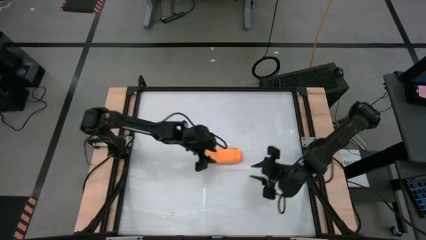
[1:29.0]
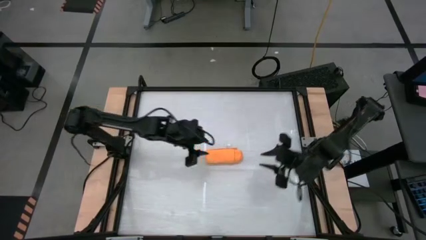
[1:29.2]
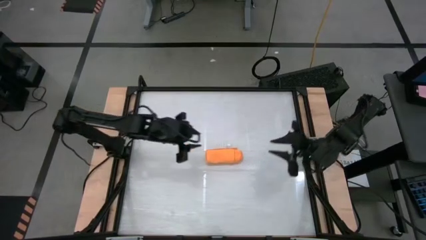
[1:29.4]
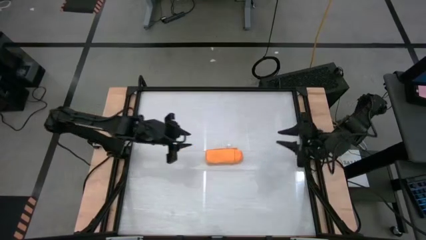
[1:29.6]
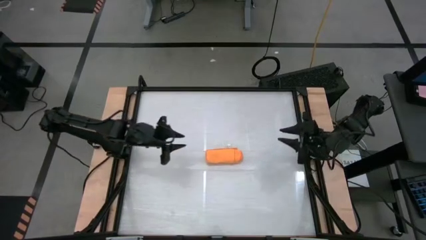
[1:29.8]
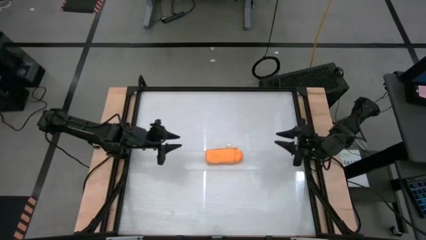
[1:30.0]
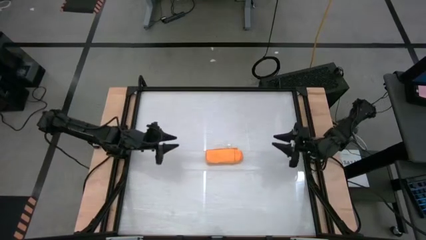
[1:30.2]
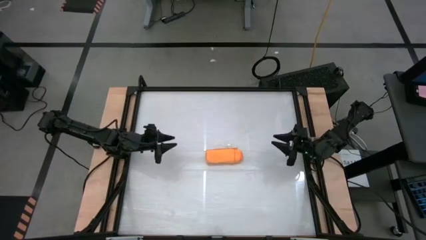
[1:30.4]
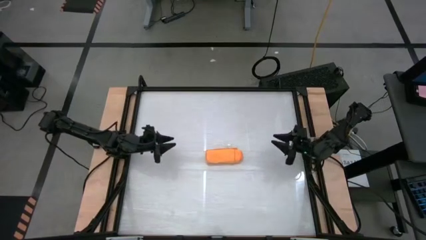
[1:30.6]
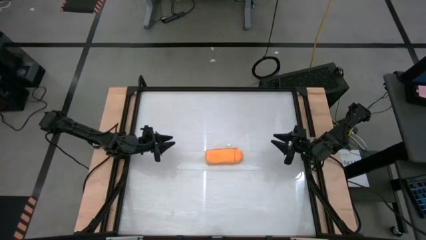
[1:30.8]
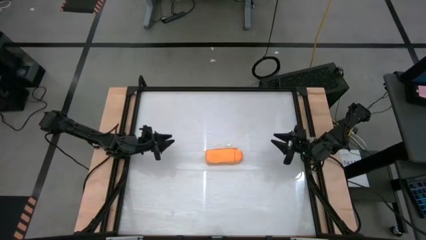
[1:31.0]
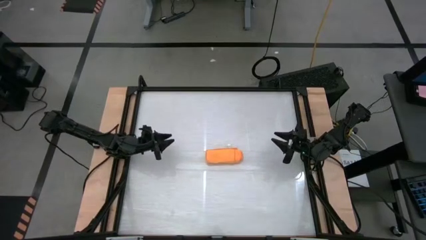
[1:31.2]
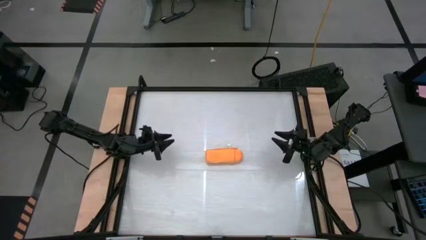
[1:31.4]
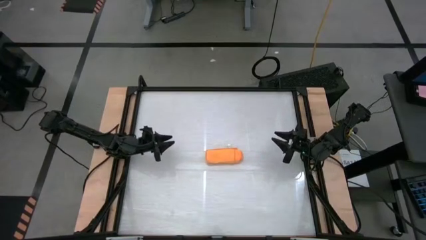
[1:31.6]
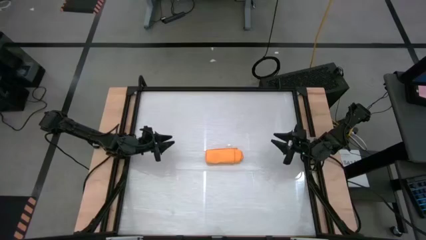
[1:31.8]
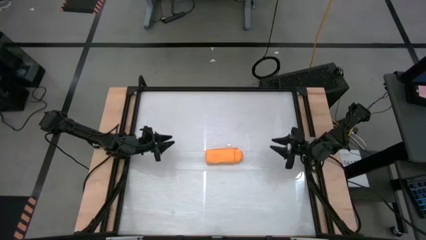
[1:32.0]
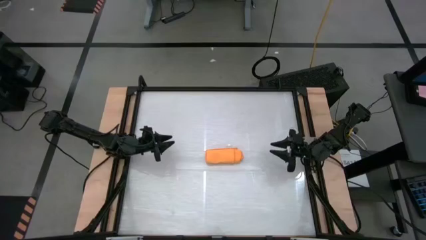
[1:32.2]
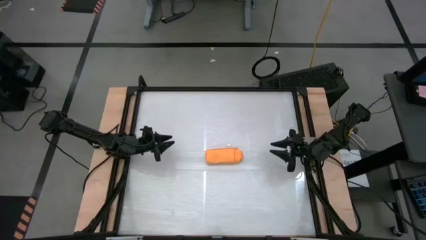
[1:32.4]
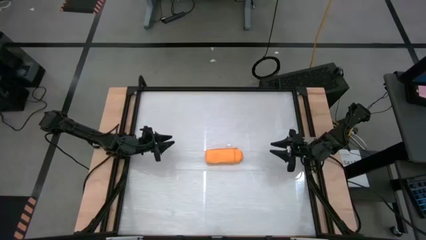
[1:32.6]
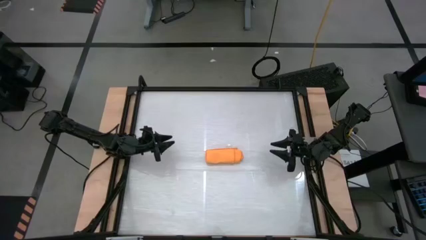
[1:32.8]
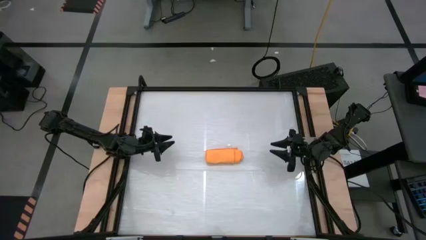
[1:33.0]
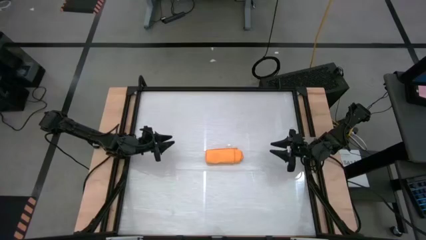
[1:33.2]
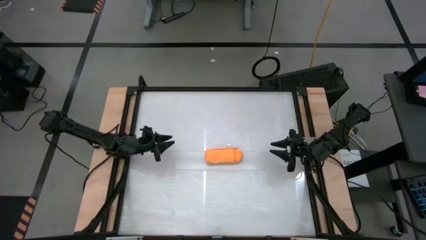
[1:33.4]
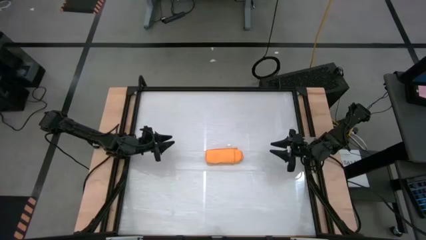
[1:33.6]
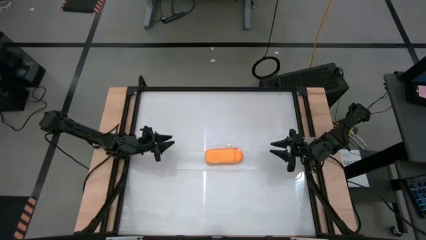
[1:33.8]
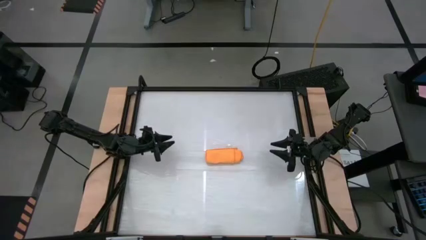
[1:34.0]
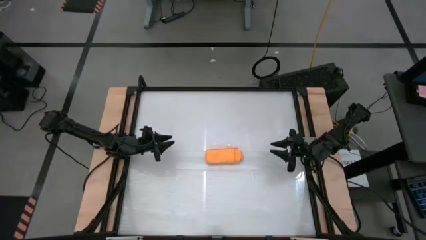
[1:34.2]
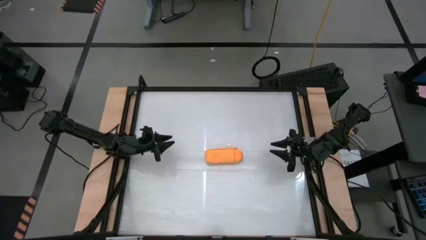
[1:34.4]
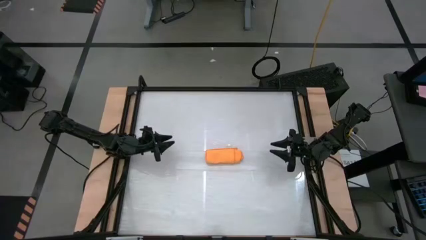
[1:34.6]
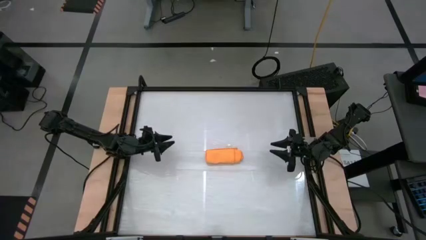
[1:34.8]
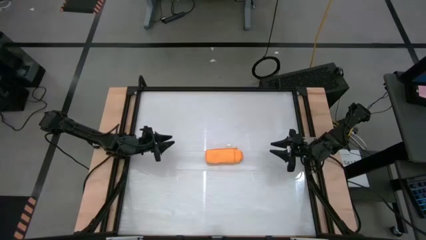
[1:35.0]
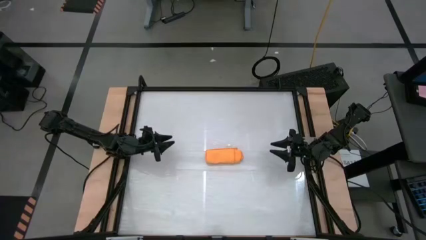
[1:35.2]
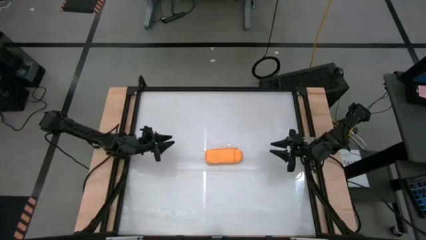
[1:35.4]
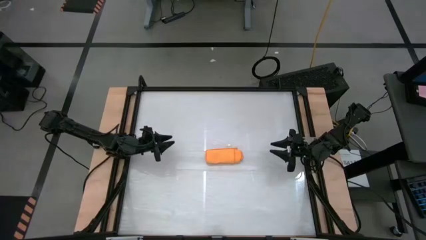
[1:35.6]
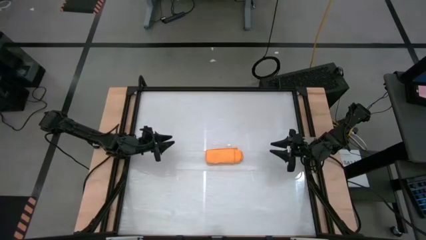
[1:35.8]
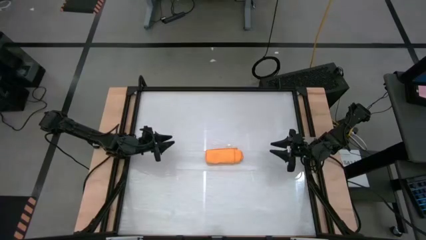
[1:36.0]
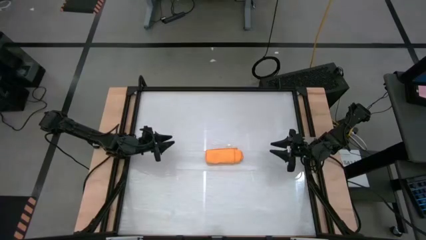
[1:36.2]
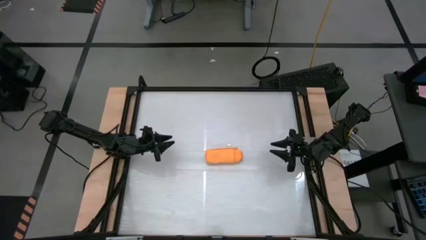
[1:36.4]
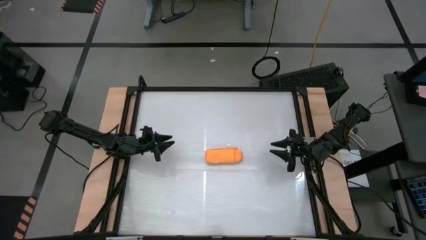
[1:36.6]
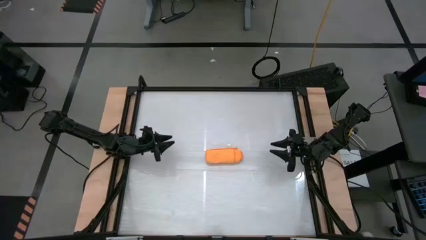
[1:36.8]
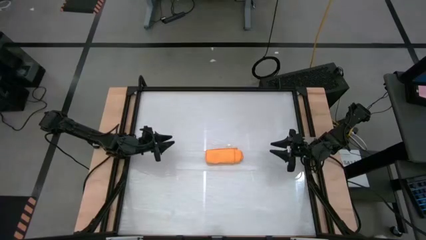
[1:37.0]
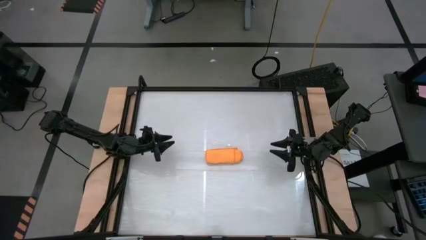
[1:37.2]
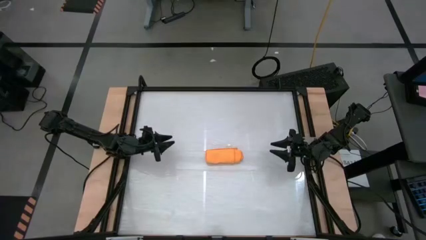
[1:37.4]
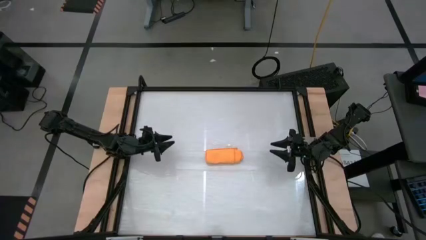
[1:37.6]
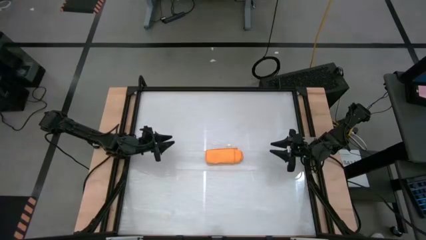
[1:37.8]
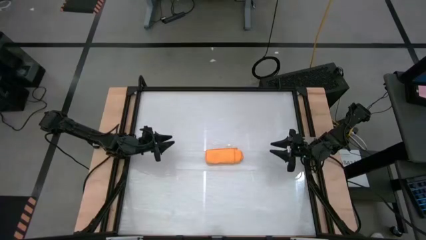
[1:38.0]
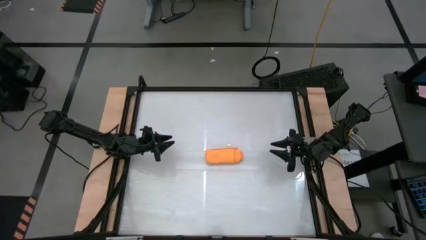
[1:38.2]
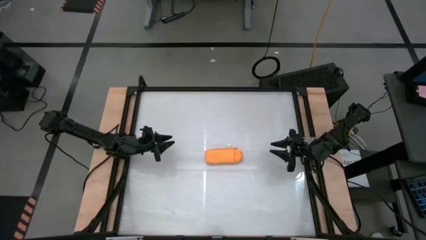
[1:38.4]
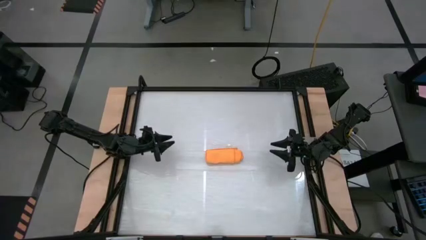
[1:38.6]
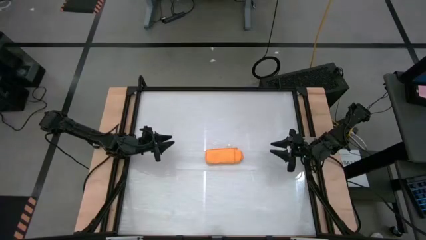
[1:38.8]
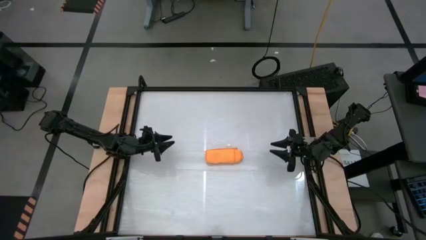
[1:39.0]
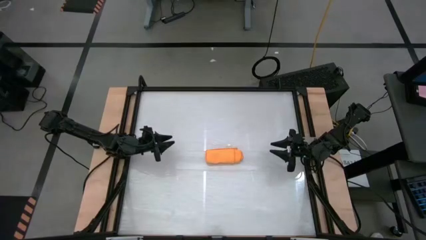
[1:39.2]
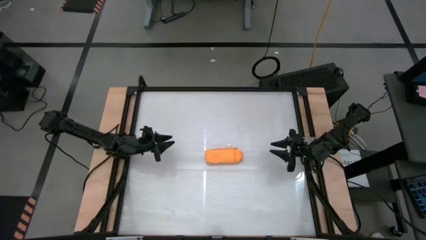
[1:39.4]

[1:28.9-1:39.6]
Task: Roll towel
Return to Home Position
